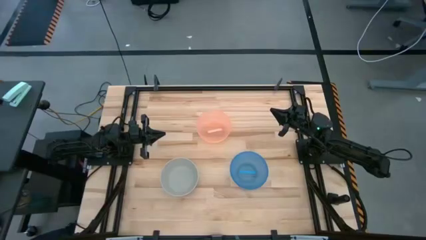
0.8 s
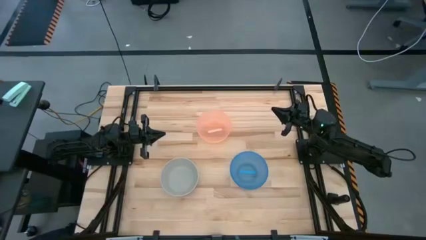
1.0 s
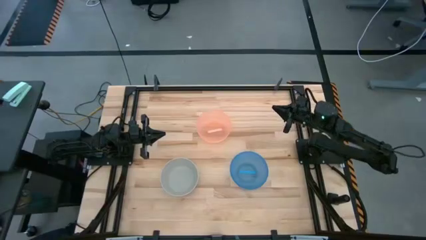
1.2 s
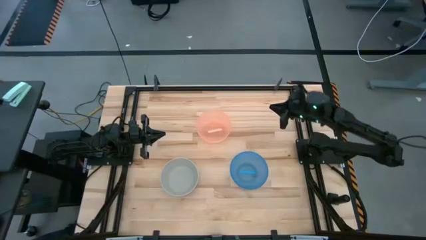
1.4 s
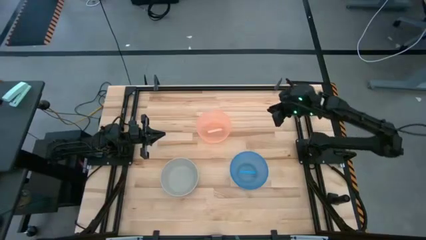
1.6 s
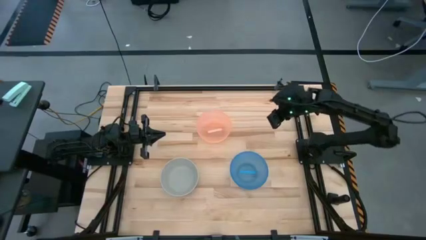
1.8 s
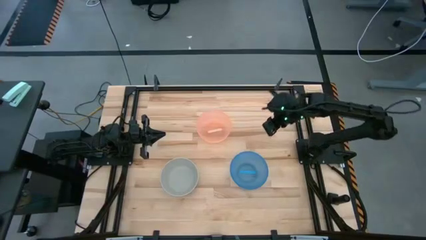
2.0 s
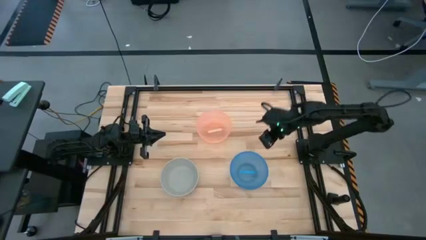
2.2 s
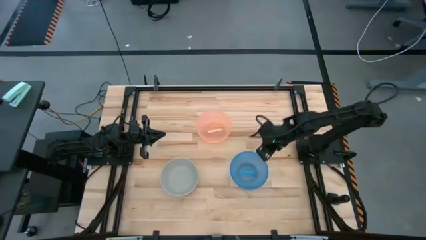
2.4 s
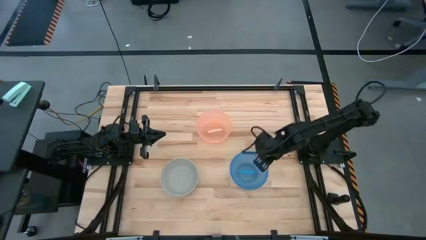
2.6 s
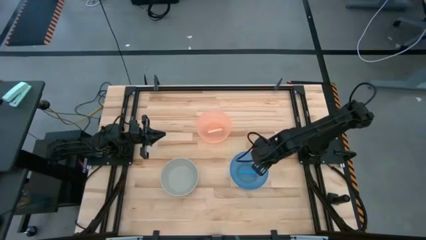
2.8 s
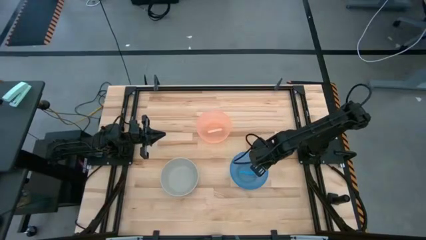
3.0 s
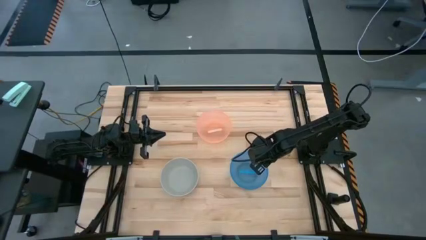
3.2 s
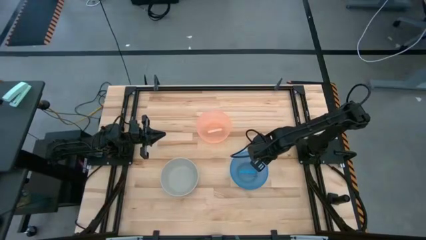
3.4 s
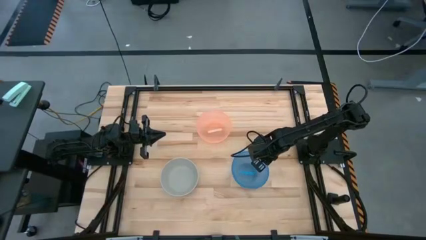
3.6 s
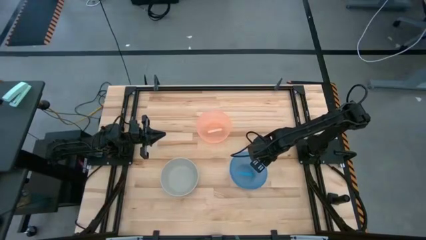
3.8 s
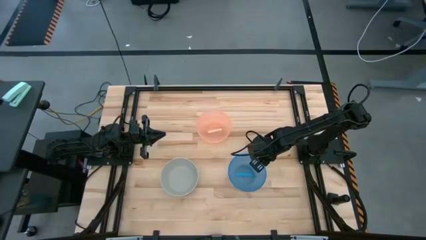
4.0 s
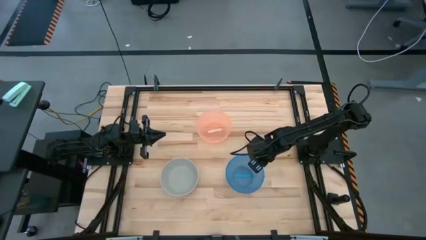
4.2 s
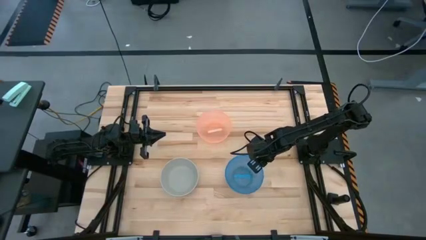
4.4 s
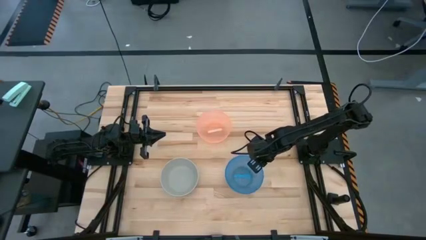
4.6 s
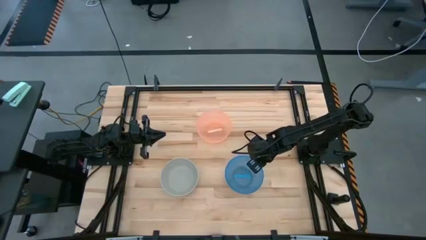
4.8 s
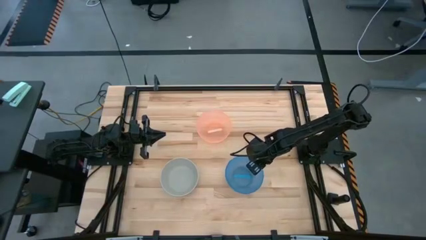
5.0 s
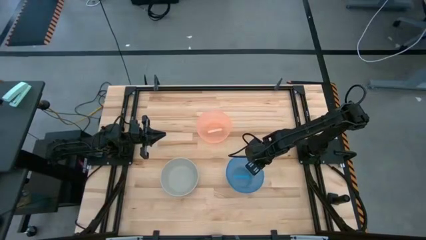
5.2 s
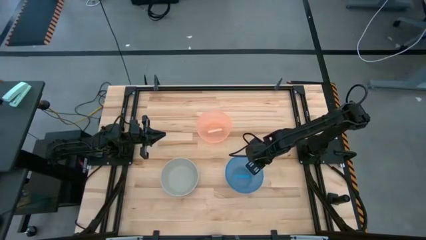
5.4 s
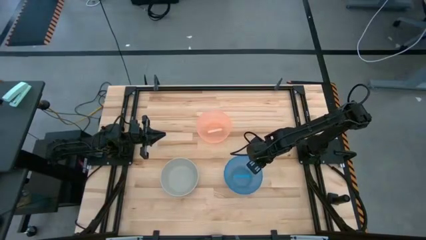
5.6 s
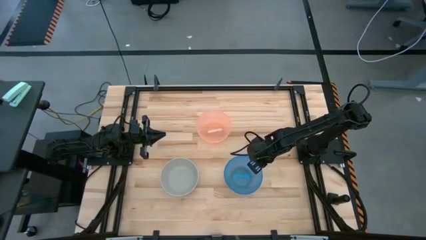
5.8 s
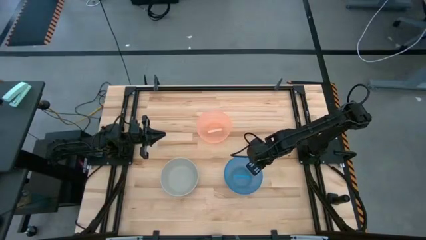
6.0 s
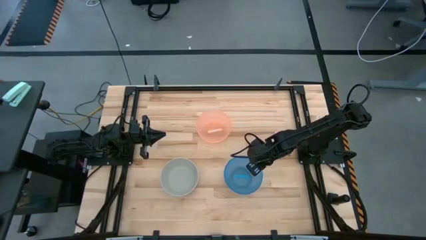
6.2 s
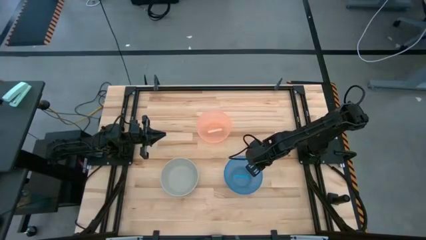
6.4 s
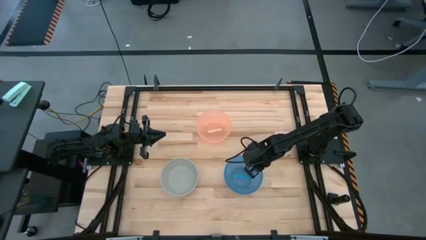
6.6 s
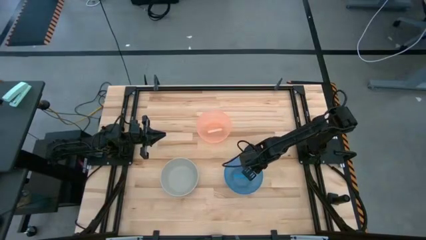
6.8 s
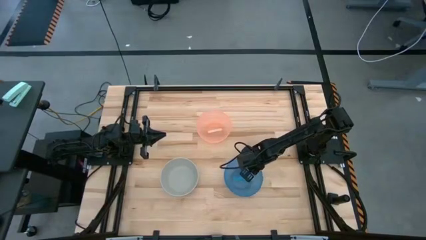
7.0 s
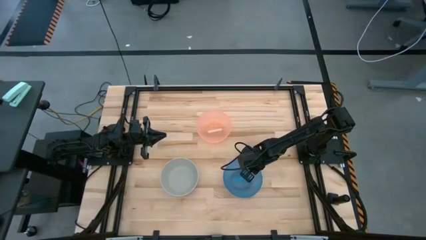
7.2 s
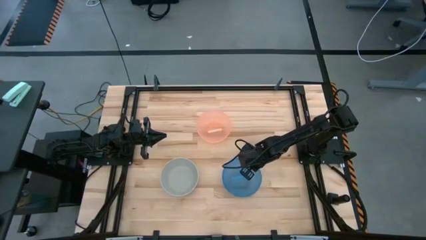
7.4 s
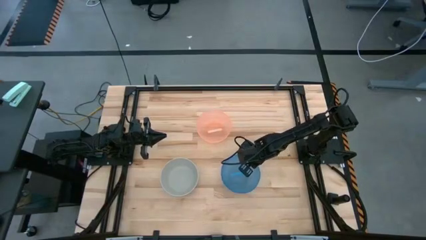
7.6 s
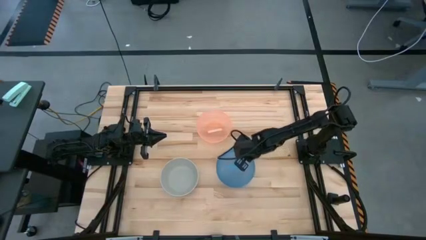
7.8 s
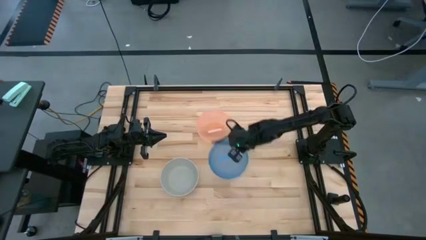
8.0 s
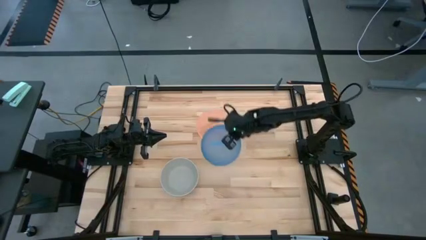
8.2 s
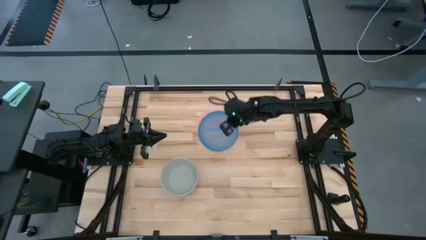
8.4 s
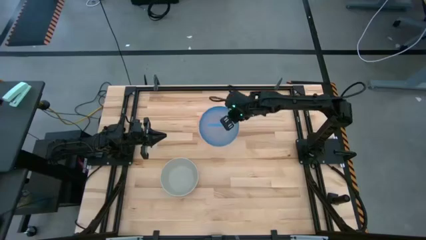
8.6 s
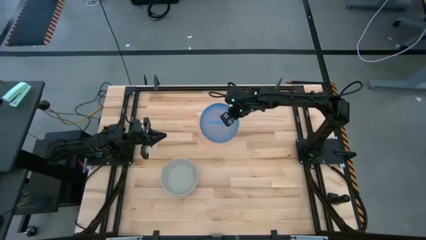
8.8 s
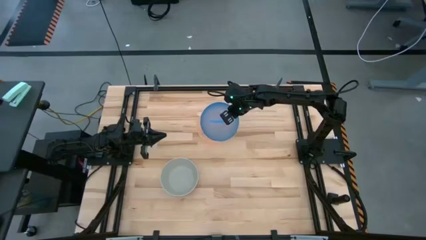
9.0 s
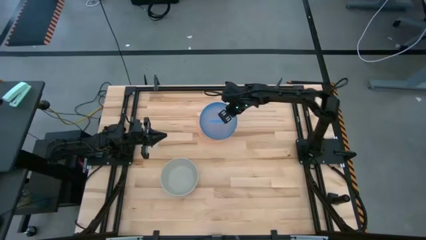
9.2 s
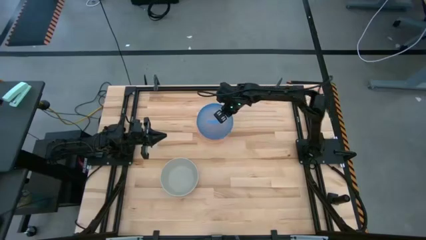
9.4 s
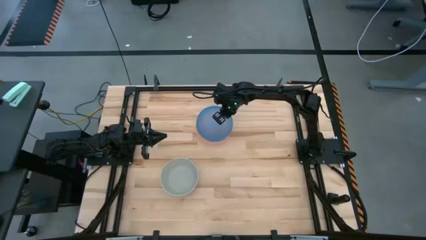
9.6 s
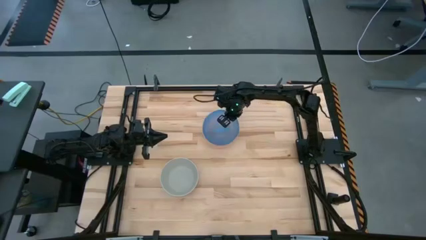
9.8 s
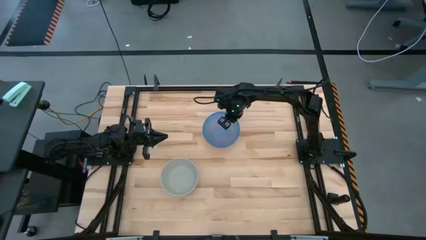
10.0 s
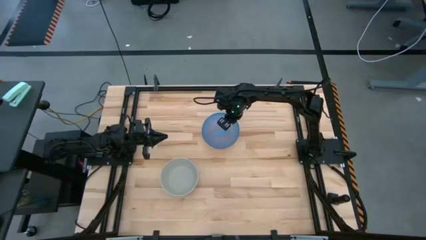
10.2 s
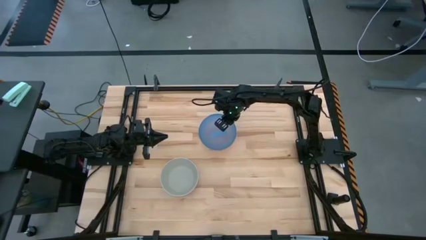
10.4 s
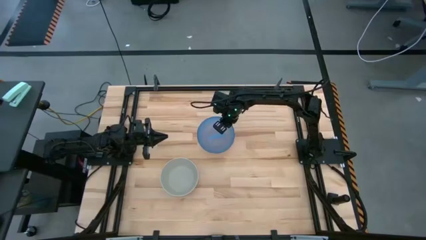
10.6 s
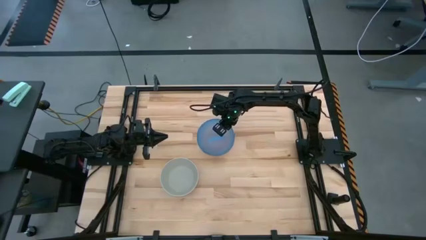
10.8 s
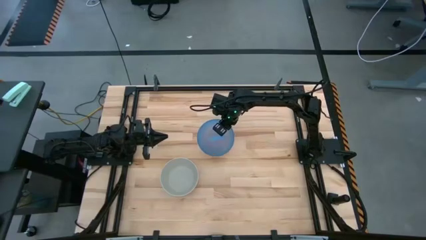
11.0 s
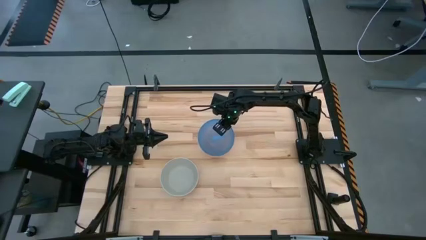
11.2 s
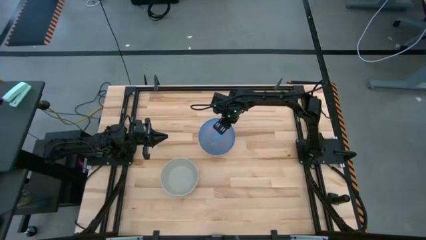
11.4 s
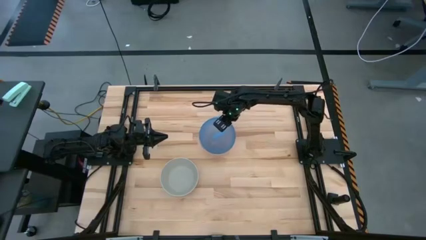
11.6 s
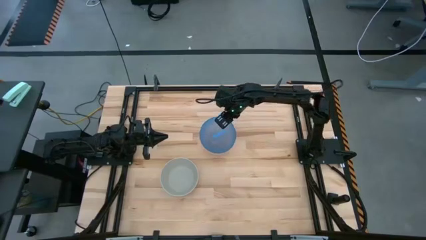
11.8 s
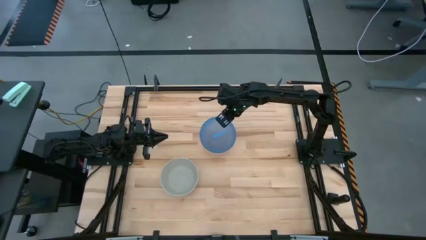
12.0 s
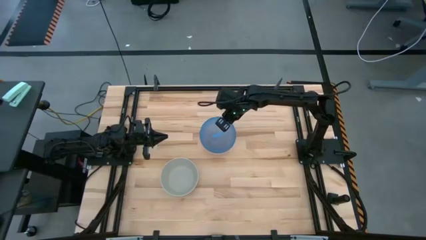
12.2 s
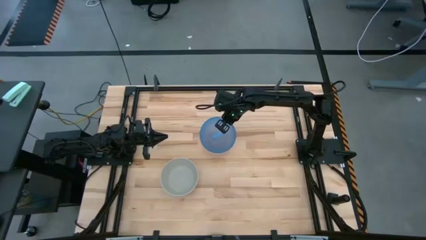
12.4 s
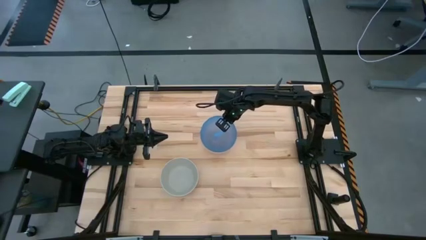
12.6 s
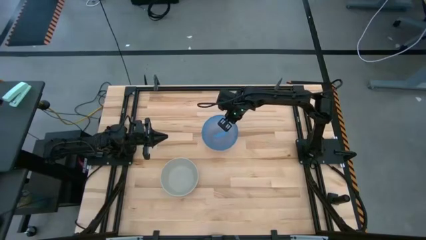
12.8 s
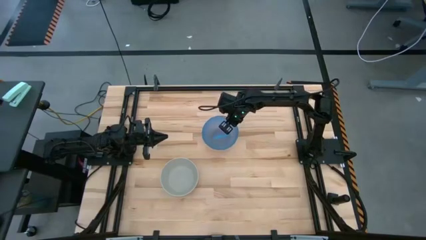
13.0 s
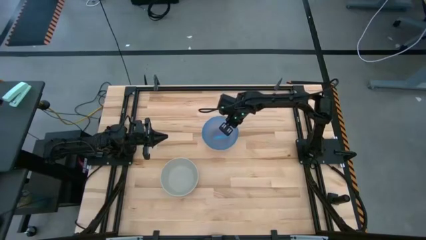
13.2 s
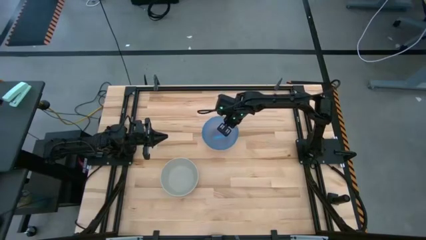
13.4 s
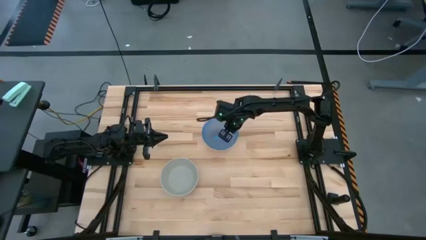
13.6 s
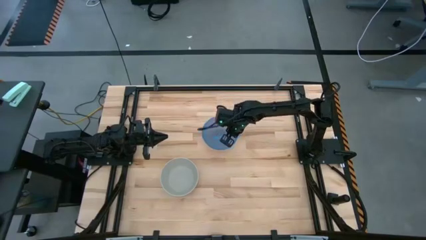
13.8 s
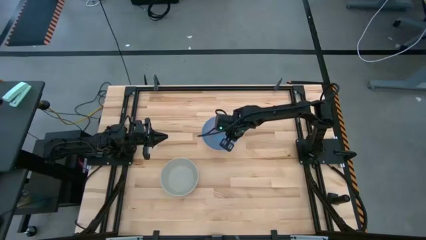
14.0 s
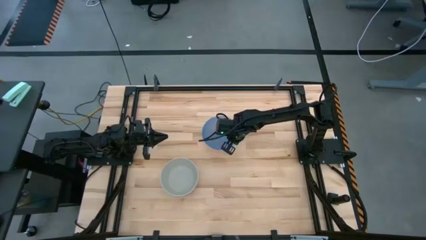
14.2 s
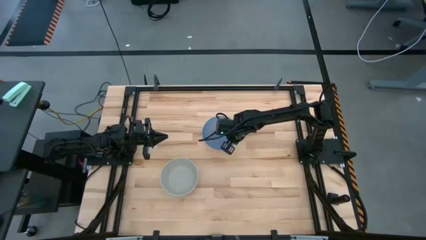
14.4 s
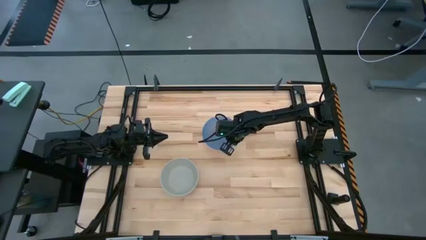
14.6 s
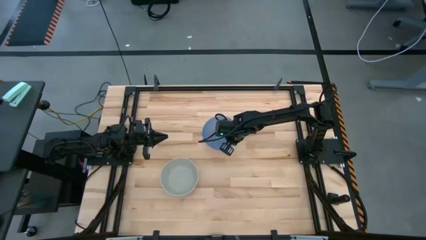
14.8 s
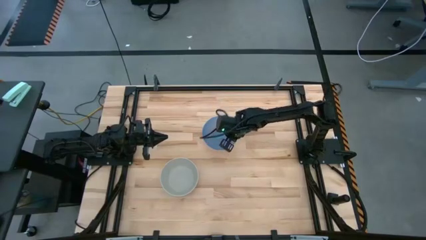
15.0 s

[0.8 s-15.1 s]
Task: Nest bowls inside each other
Stack the blue bowl on the orange bowl
